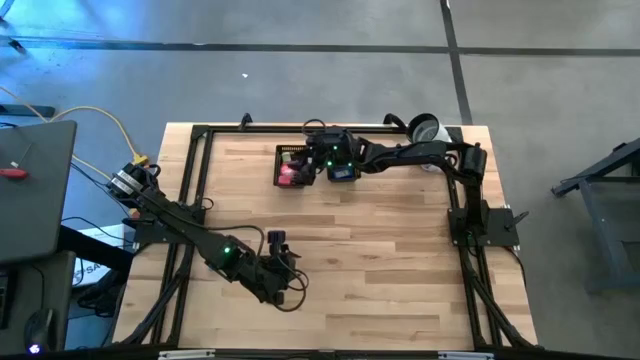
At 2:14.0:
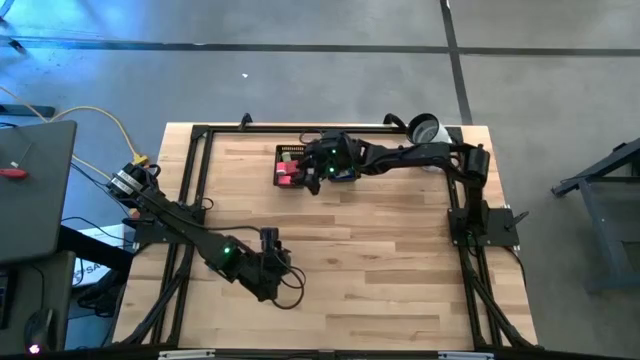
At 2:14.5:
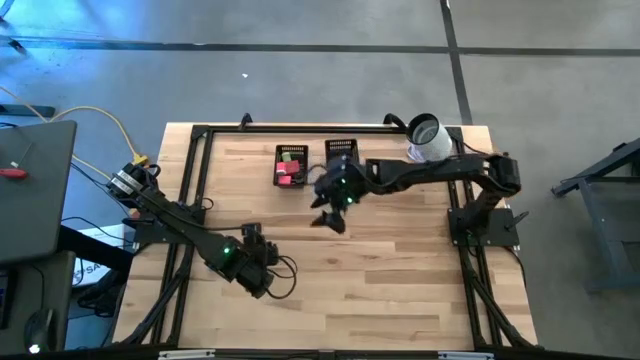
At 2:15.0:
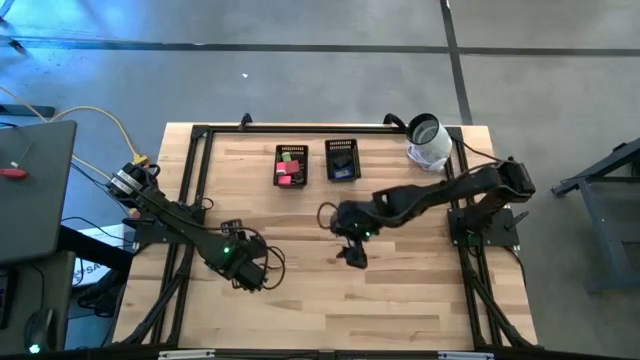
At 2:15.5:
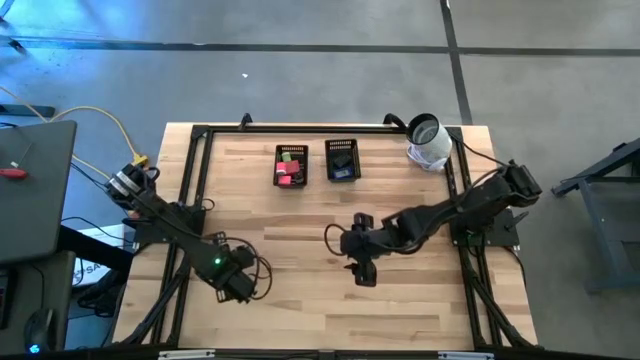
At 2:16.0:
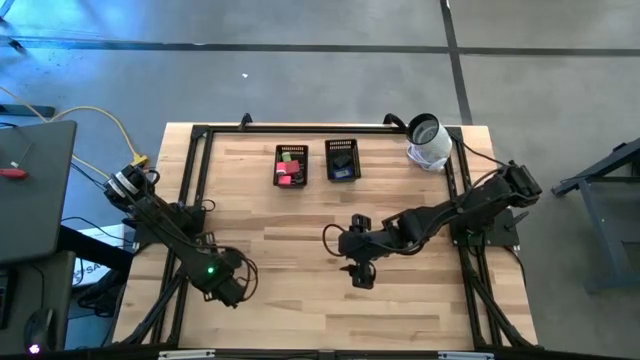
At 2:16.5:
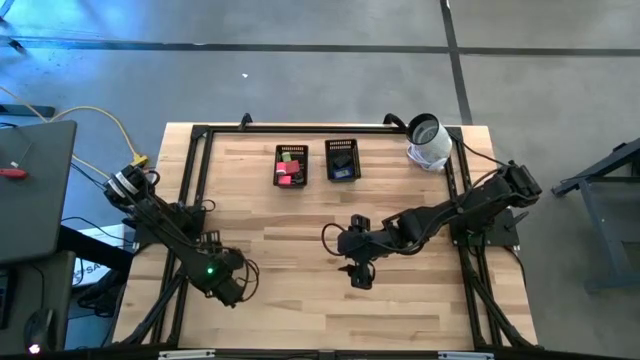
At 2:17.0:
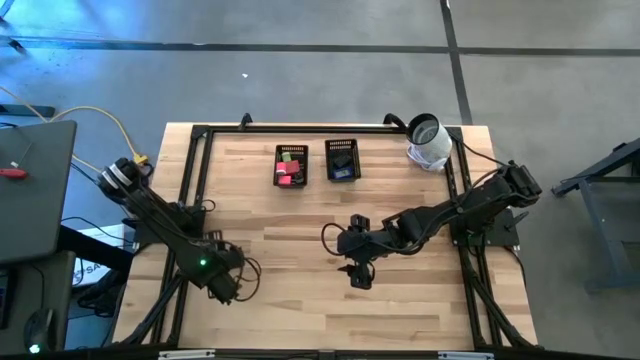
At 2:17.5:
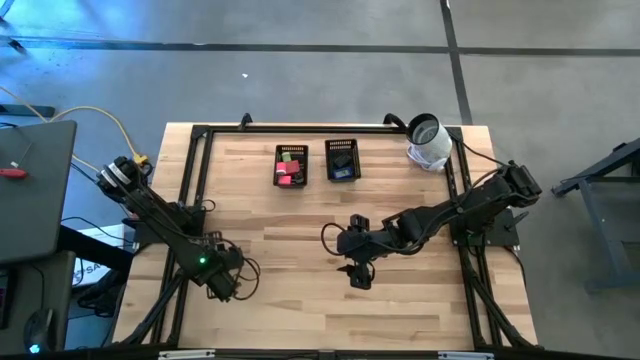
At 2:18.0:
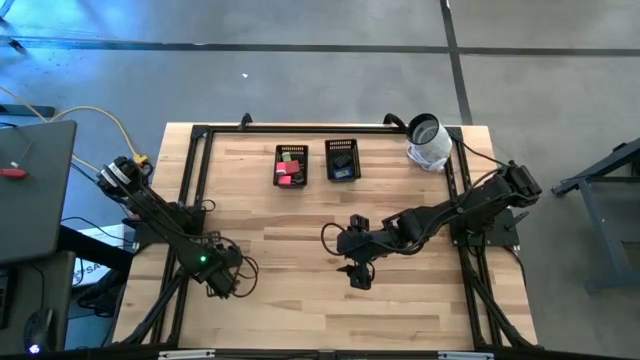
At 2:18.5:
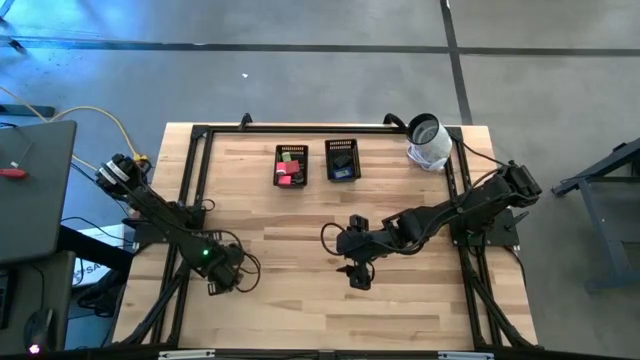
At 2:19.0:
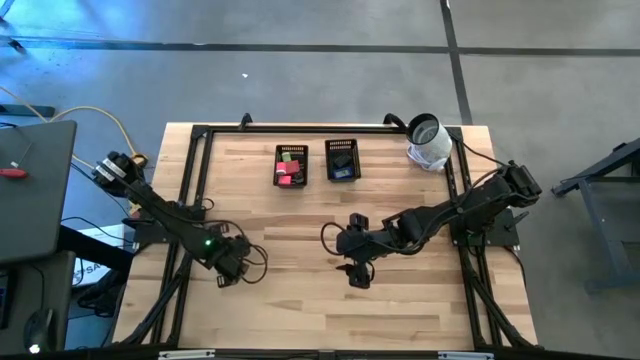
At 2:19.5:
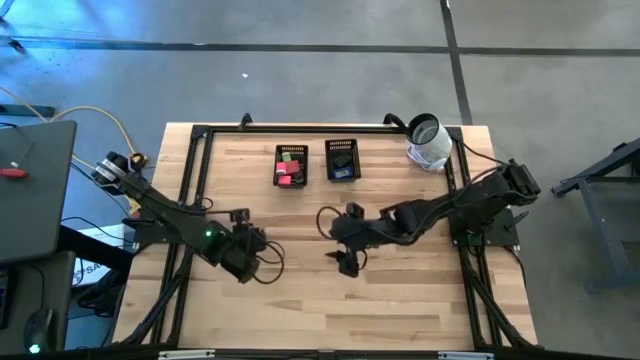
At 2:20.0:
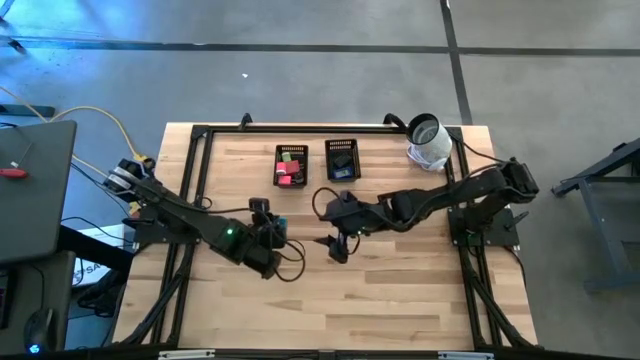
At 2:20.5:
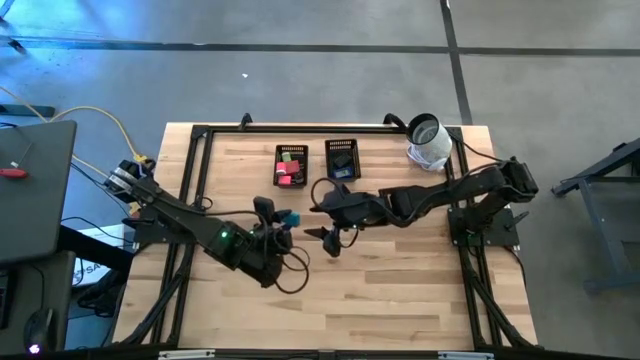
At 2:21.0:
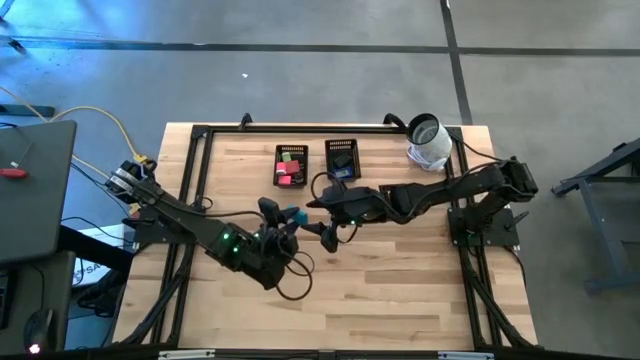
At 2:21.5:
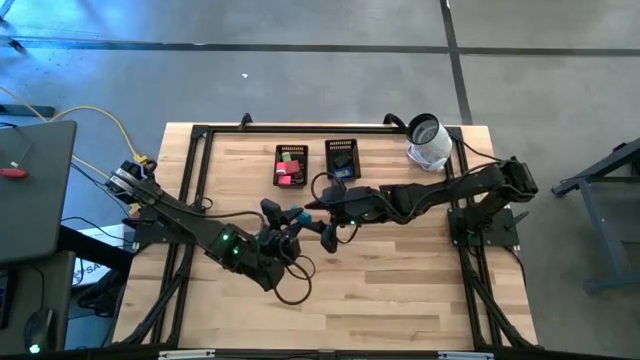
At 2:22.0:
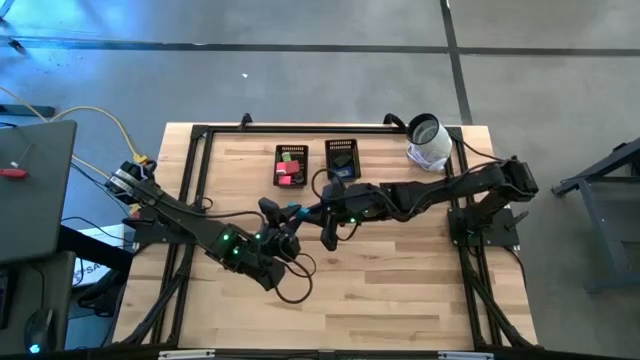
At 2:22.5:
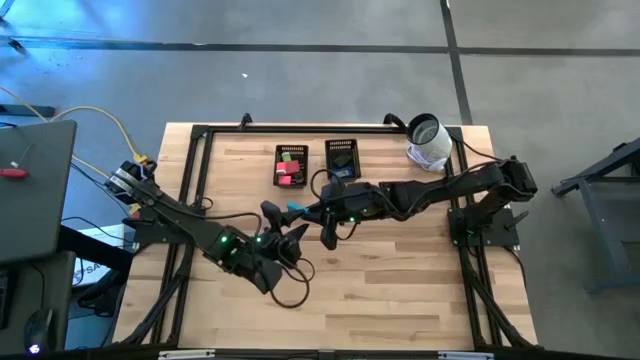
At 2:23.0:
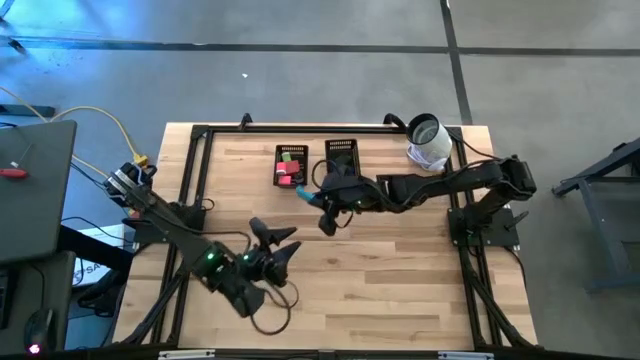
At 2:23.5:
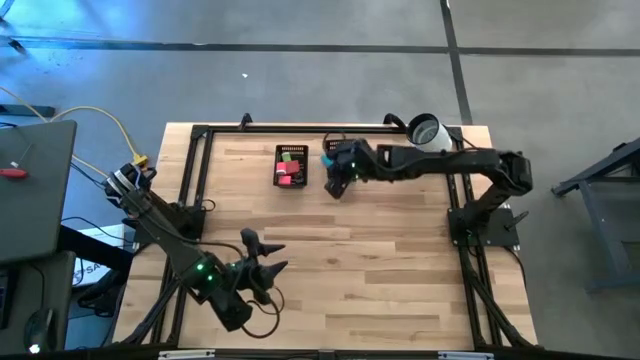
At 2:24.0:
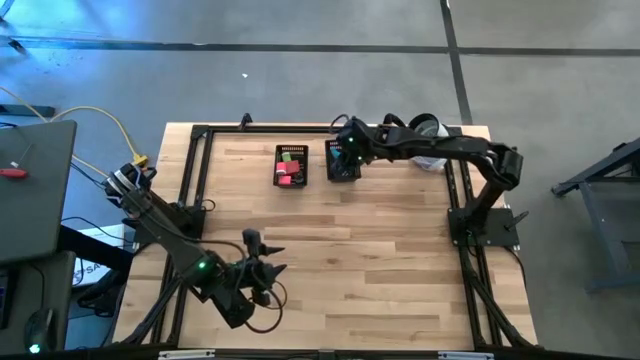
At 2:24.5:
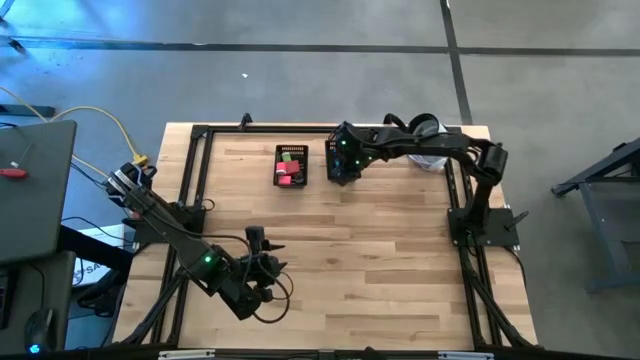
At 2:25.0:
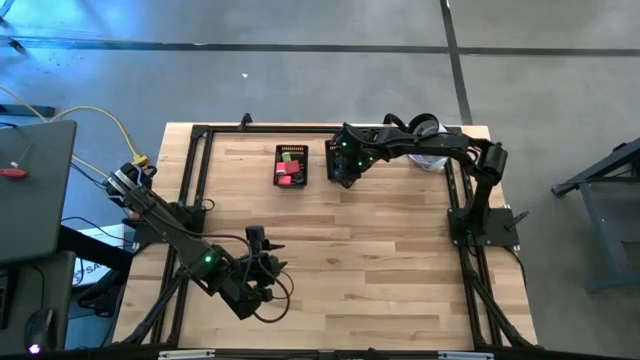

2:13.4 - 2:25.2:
Task: Pick & Place Office items
Put the light blue digital clock into the right black bin

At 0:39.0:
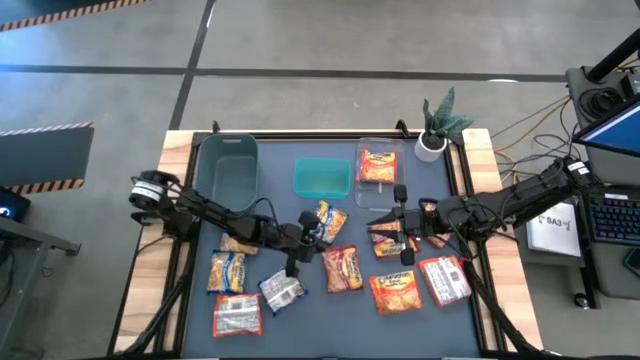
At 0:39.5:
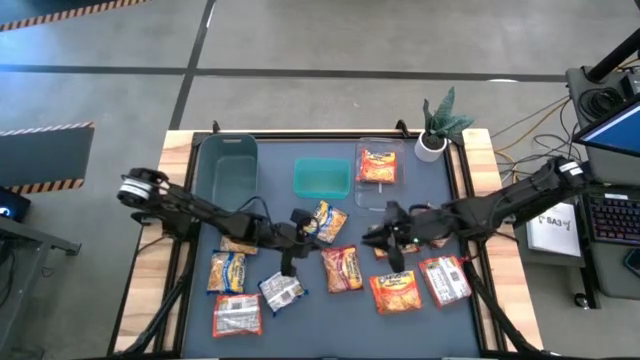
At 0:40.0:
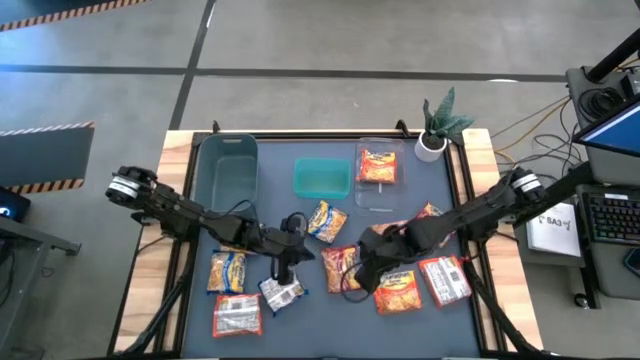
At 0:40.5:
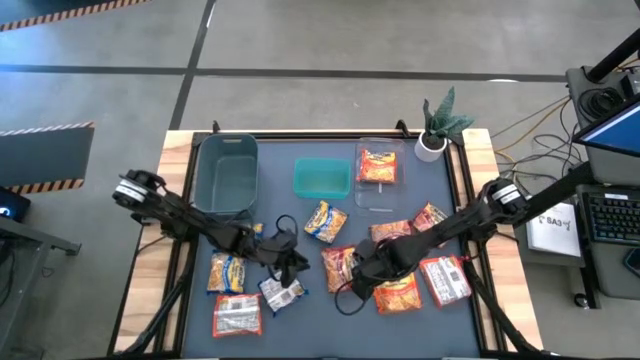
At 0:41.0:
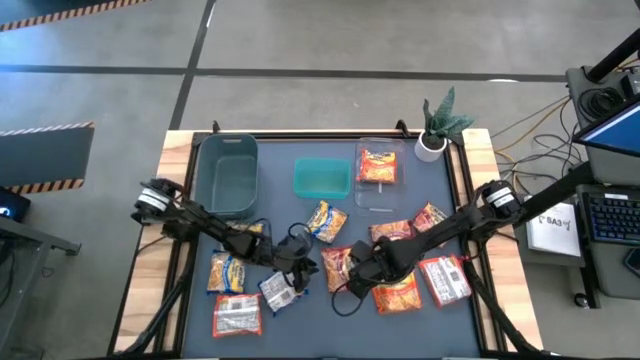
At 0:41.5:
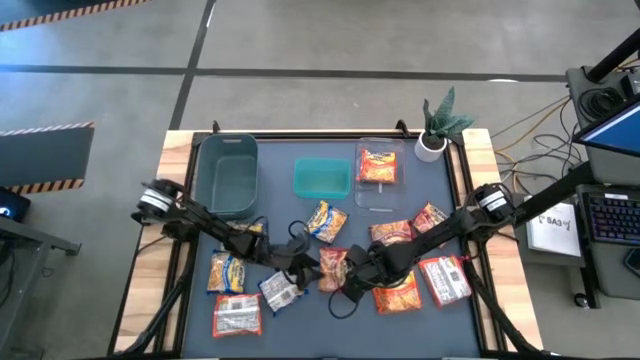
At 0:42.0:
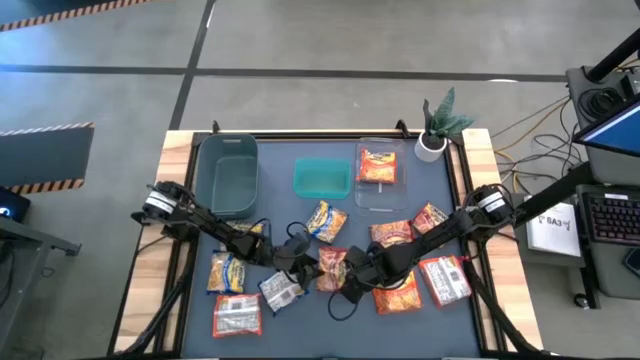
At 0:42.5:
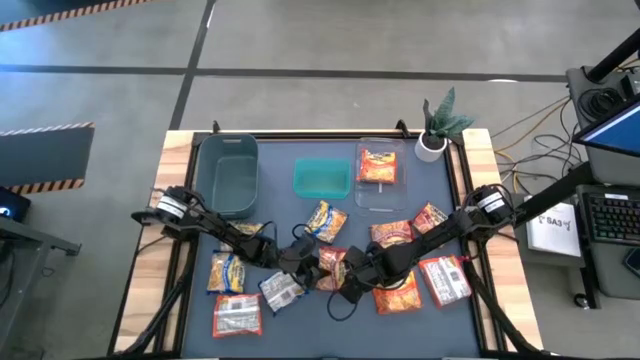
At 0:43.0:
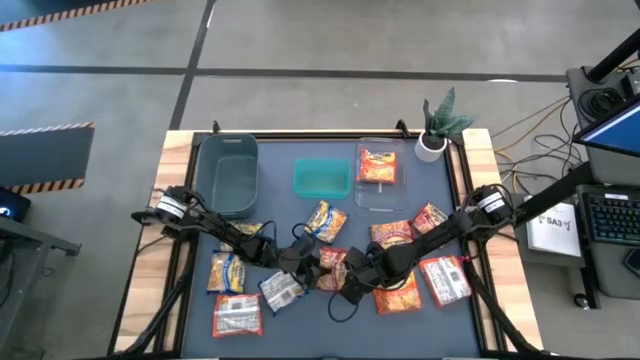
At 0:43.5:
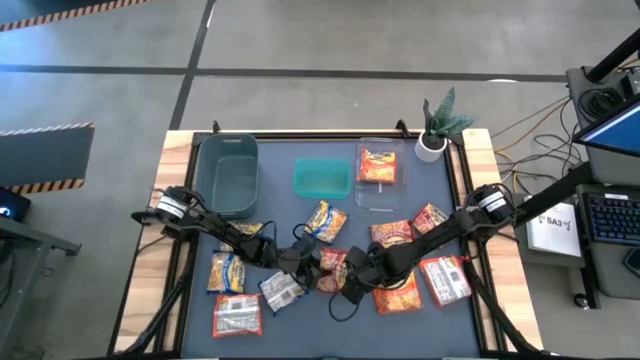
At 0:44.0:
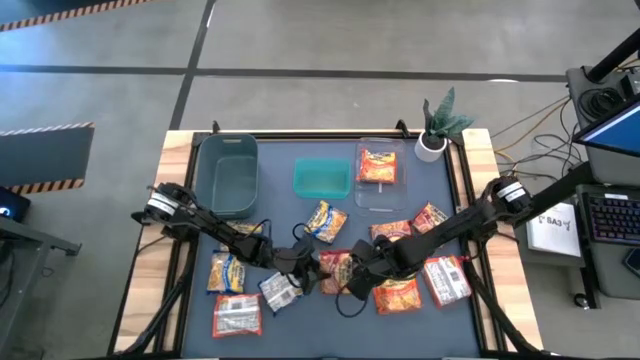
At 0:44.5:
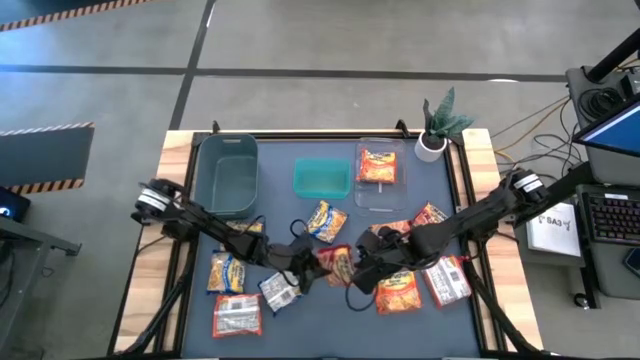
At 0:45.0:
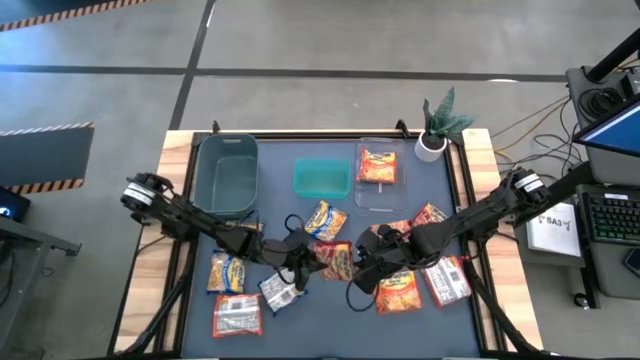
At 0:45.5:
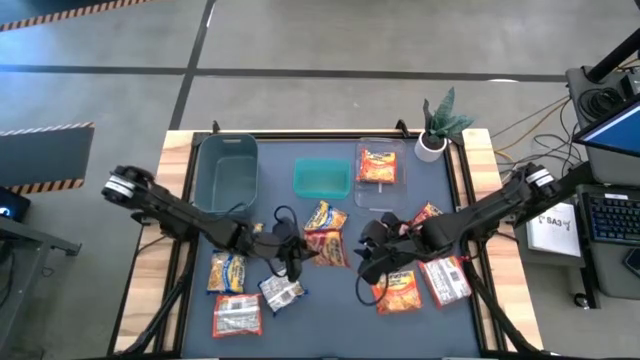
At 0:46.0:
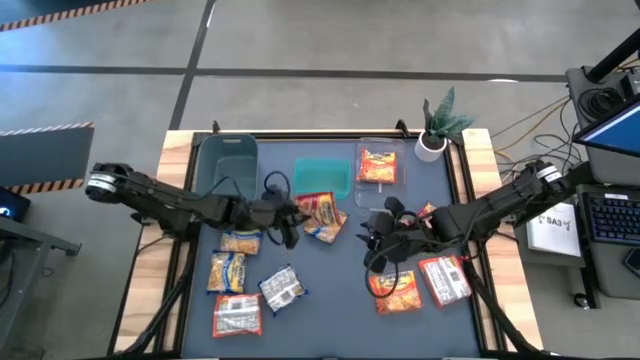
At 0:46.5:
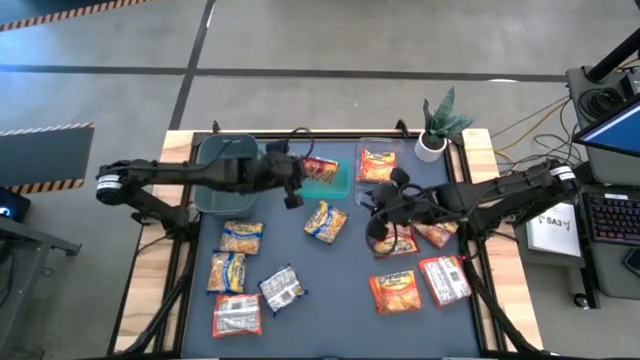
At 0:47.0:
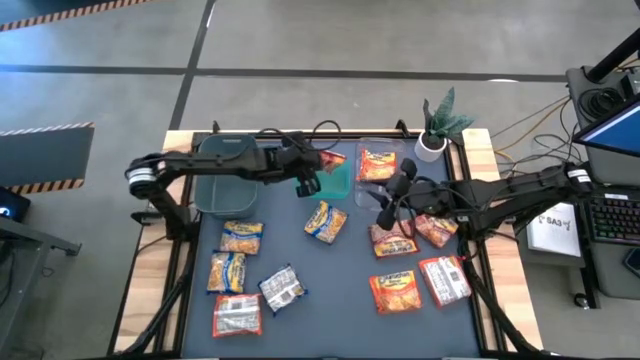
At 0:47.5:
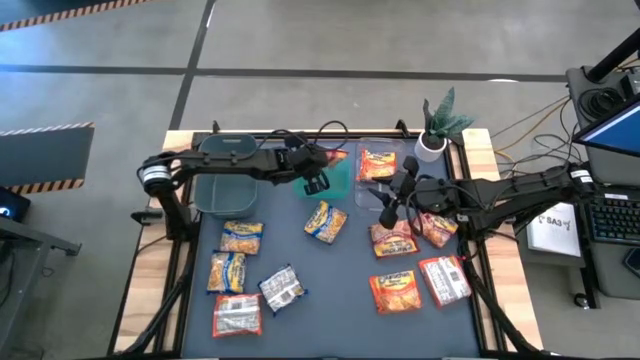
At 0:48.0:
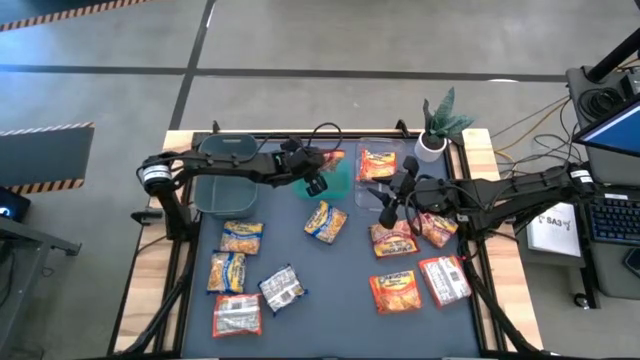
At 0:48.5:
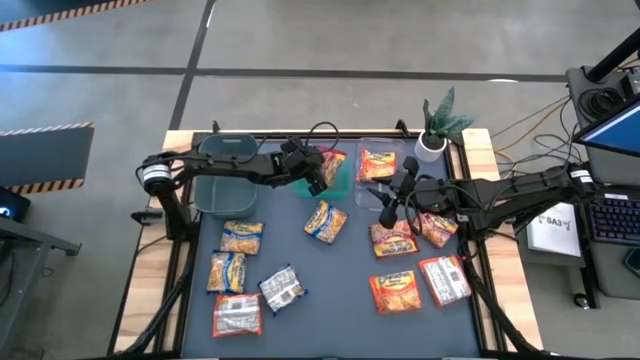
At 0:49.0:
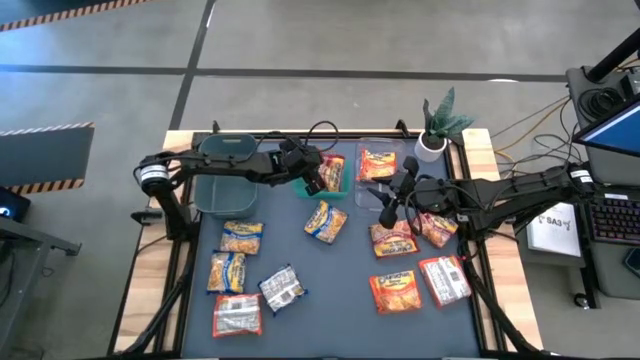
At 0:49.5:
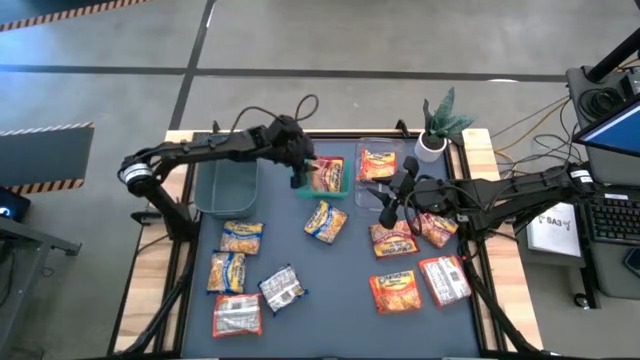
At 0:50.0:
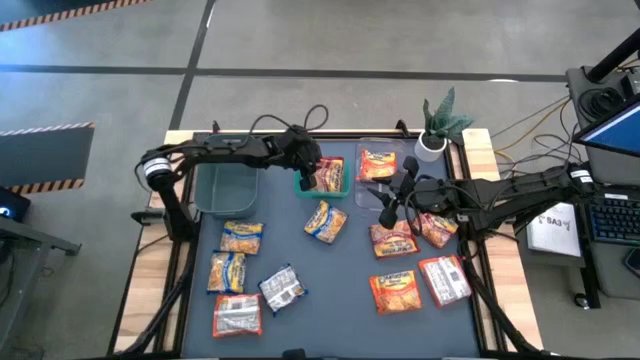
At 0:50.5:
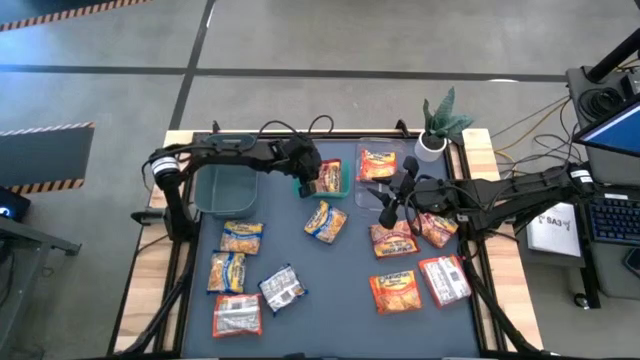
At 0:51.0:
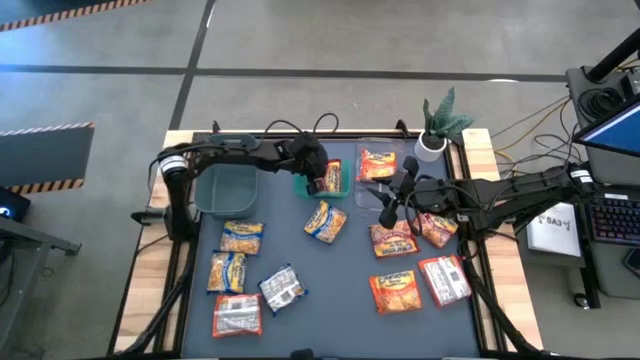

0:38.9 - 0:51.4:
Task: Sort Maruchan noodles
Put the red noodle pack into the light blue bin
